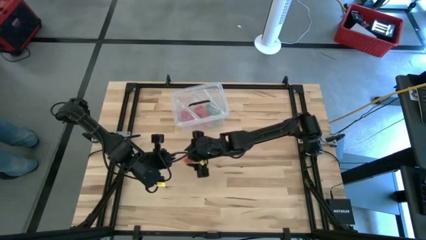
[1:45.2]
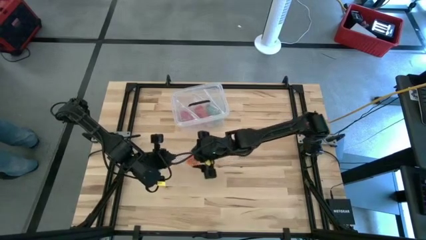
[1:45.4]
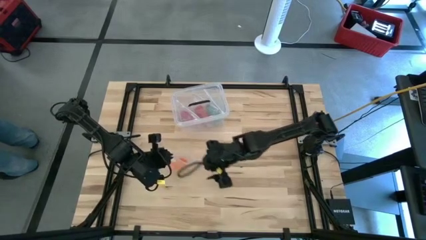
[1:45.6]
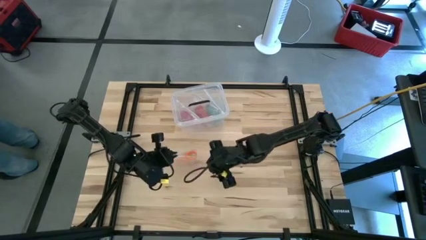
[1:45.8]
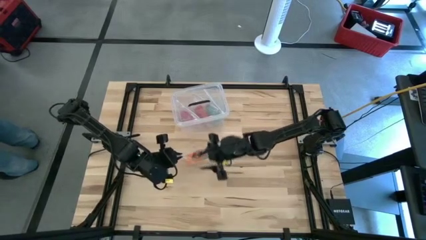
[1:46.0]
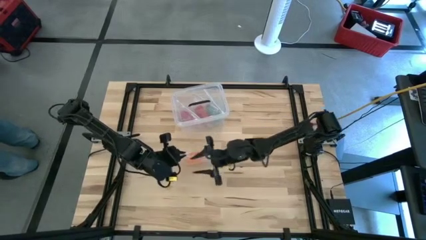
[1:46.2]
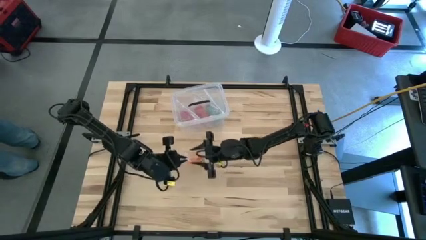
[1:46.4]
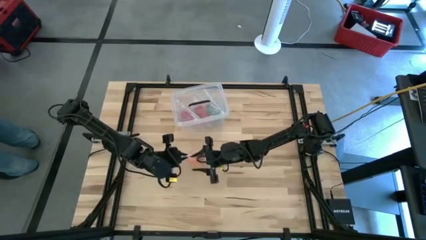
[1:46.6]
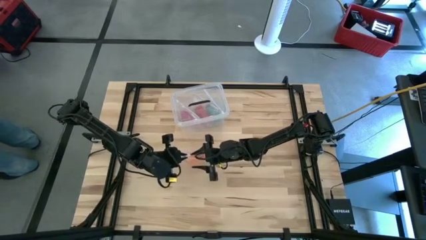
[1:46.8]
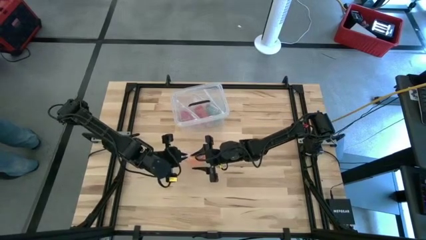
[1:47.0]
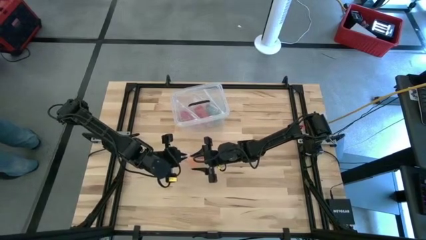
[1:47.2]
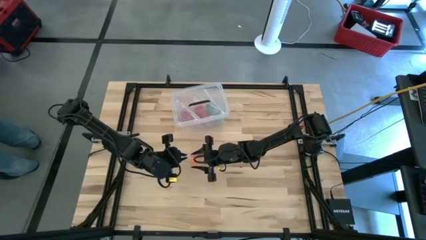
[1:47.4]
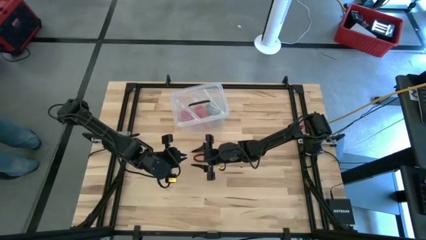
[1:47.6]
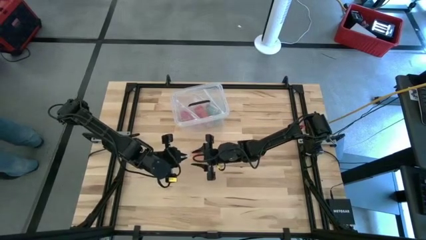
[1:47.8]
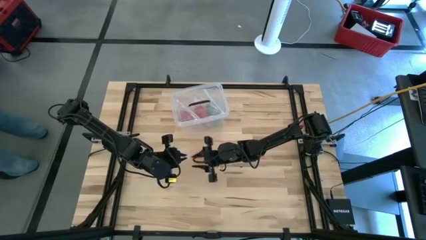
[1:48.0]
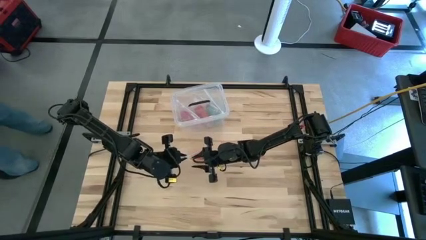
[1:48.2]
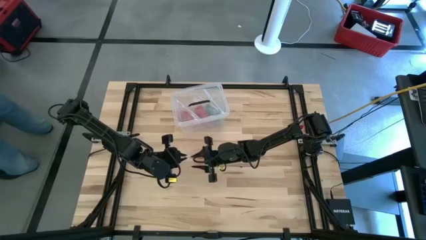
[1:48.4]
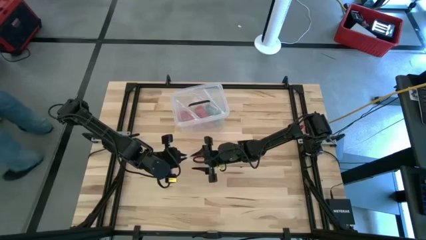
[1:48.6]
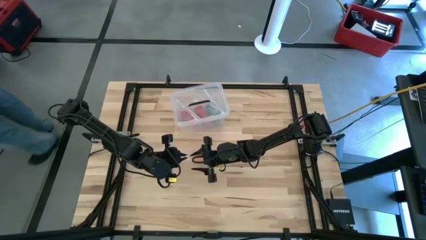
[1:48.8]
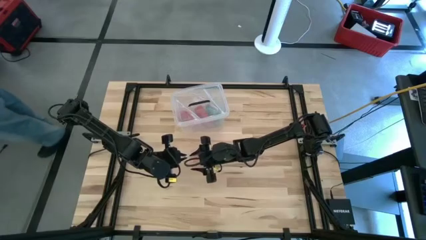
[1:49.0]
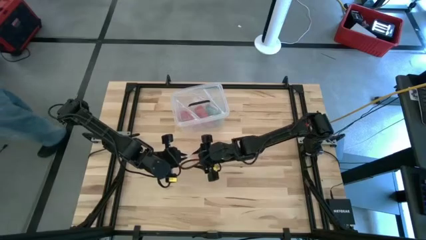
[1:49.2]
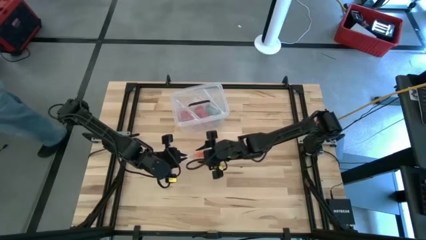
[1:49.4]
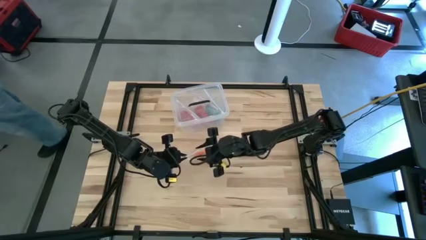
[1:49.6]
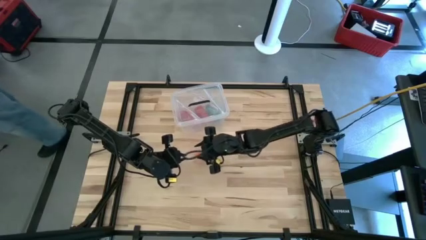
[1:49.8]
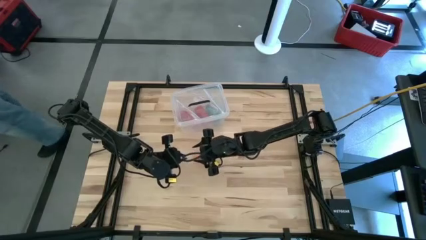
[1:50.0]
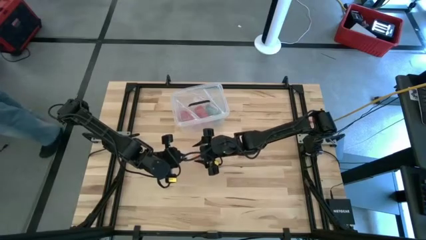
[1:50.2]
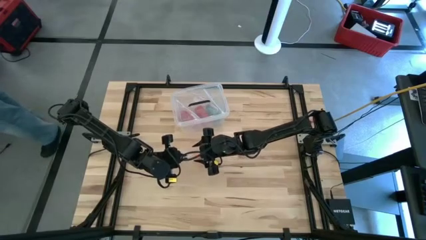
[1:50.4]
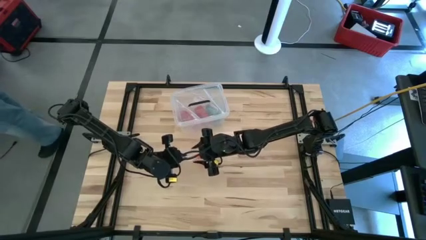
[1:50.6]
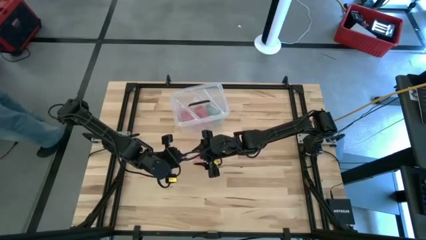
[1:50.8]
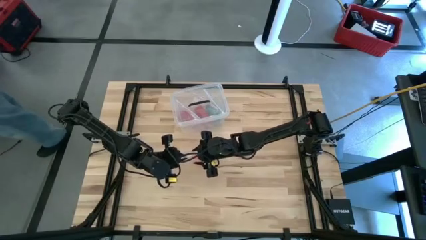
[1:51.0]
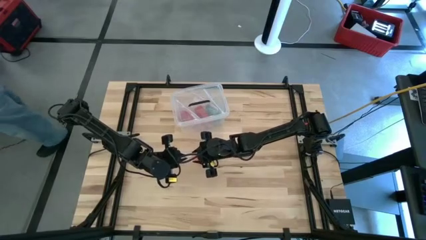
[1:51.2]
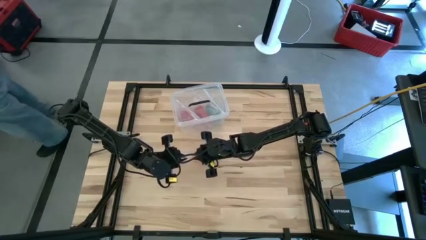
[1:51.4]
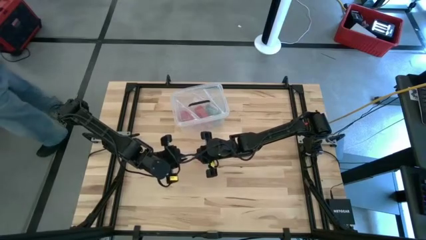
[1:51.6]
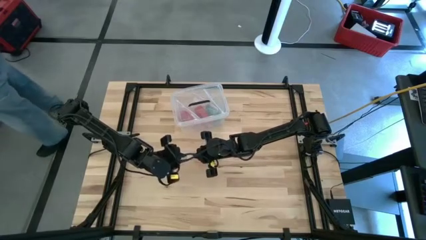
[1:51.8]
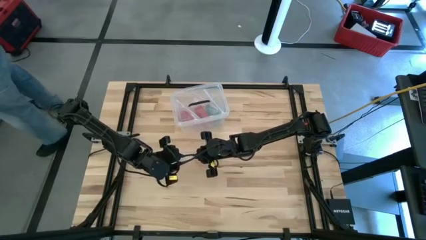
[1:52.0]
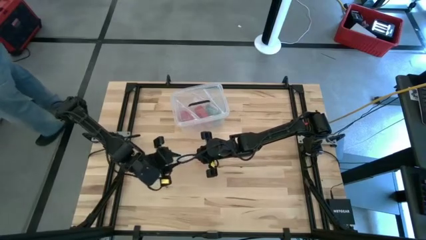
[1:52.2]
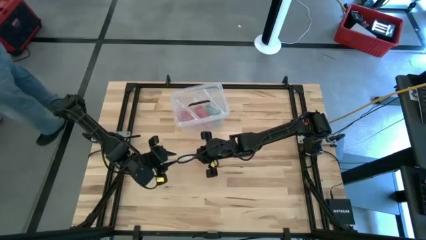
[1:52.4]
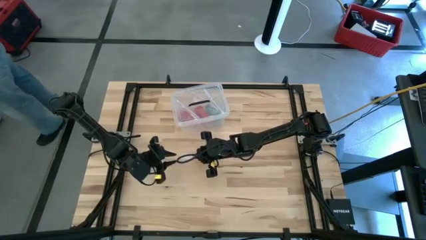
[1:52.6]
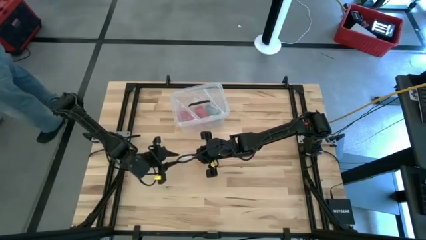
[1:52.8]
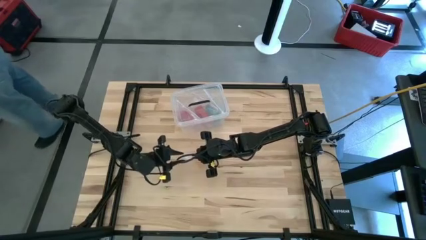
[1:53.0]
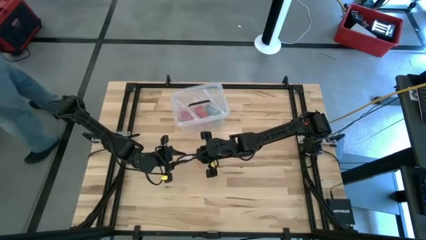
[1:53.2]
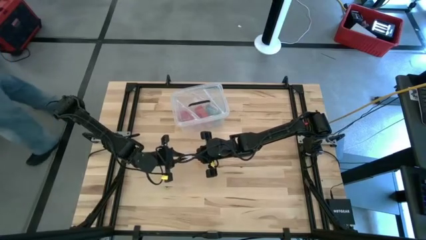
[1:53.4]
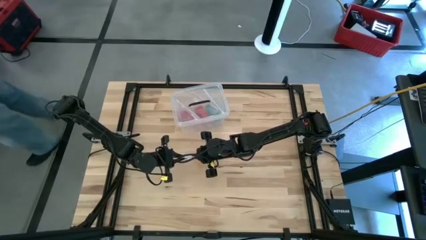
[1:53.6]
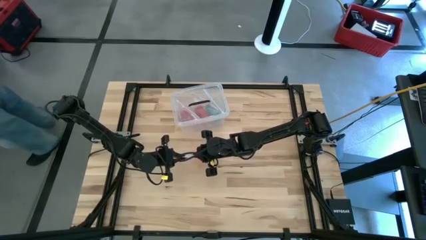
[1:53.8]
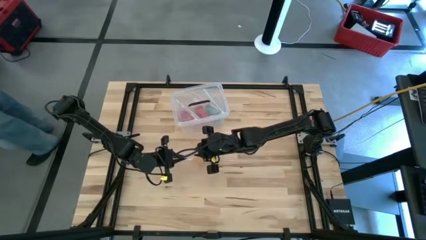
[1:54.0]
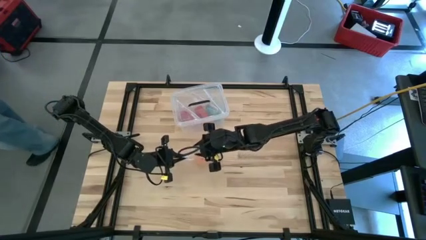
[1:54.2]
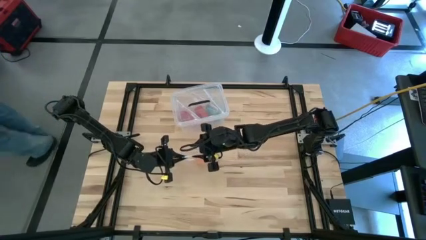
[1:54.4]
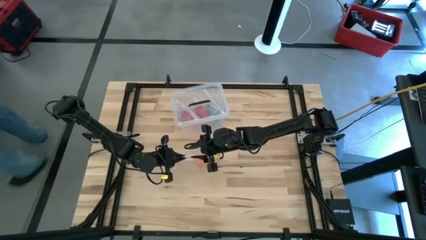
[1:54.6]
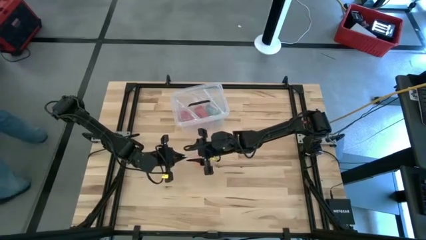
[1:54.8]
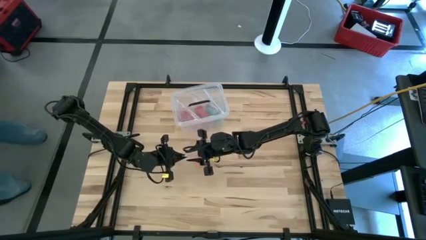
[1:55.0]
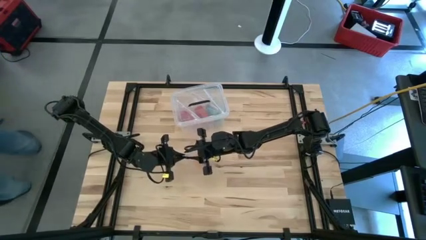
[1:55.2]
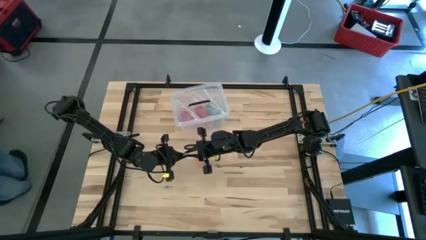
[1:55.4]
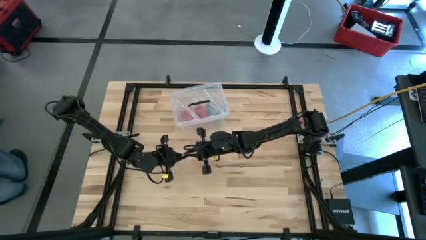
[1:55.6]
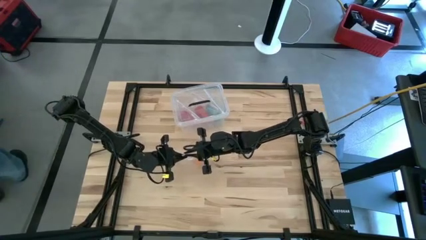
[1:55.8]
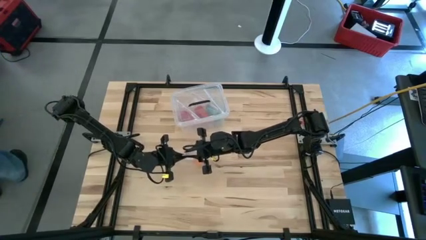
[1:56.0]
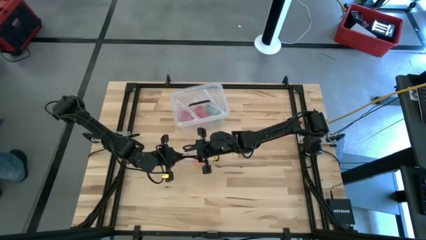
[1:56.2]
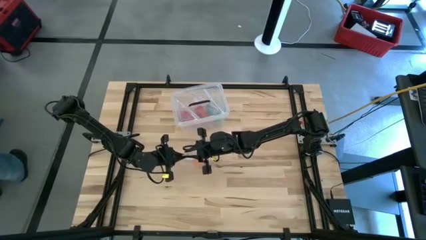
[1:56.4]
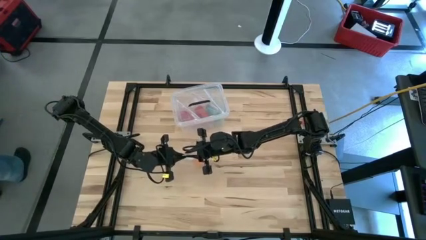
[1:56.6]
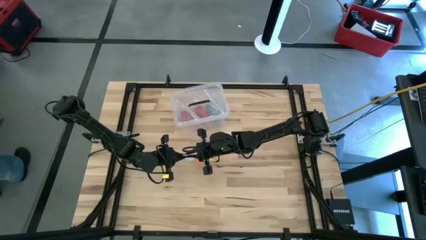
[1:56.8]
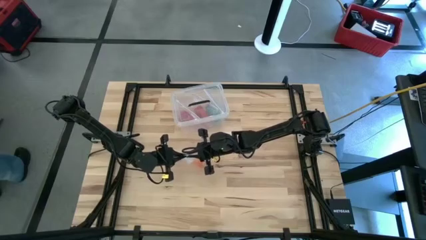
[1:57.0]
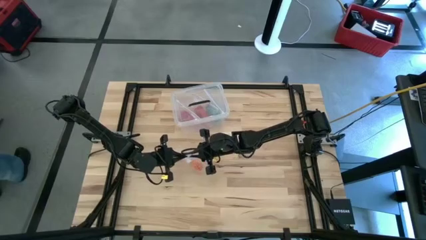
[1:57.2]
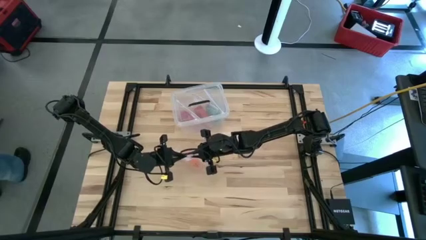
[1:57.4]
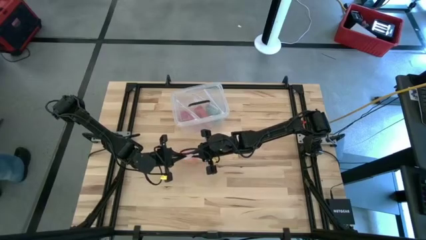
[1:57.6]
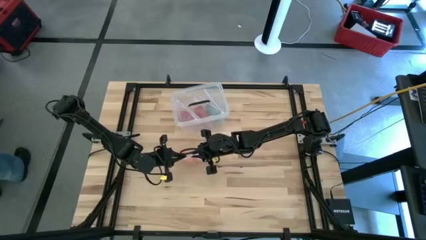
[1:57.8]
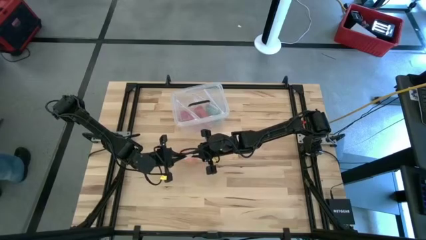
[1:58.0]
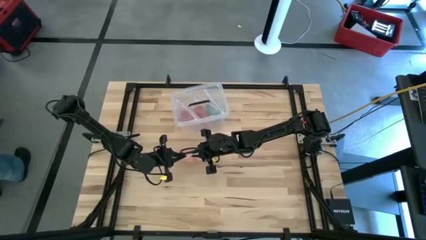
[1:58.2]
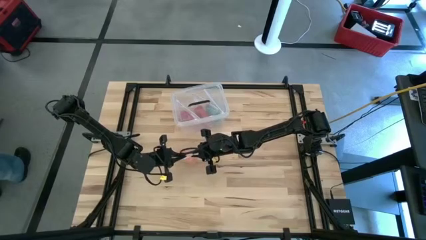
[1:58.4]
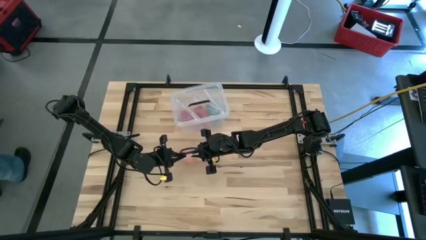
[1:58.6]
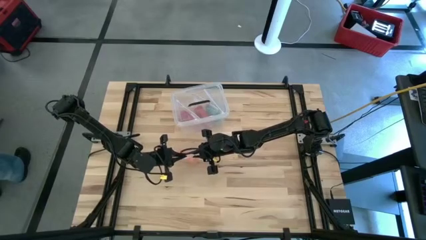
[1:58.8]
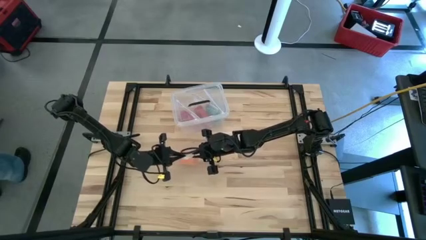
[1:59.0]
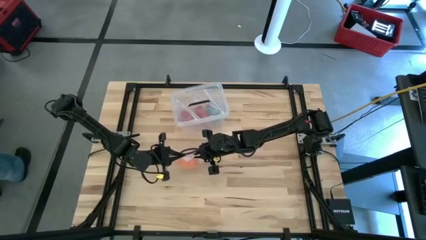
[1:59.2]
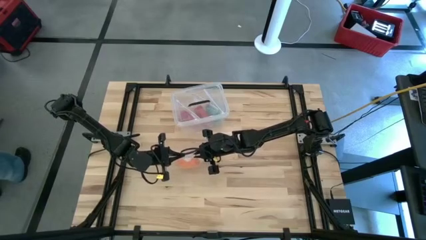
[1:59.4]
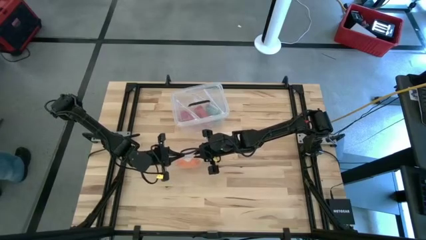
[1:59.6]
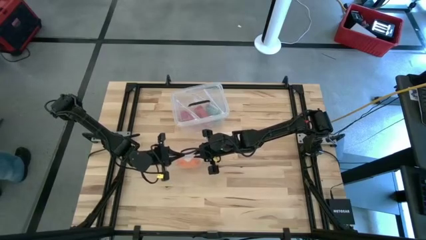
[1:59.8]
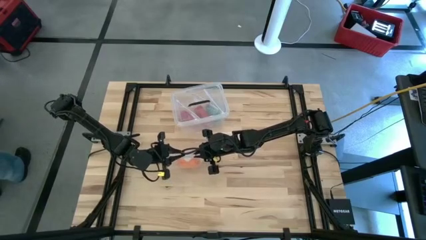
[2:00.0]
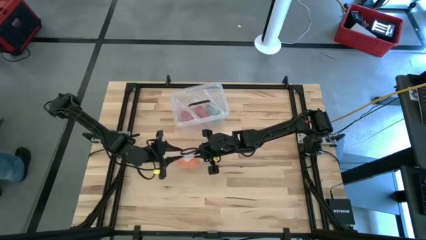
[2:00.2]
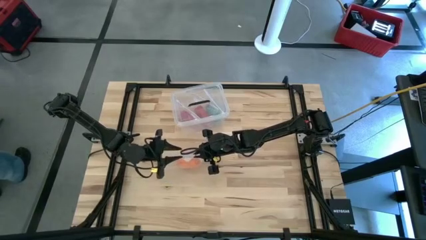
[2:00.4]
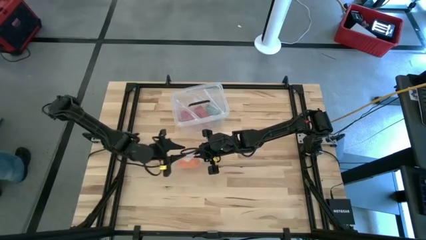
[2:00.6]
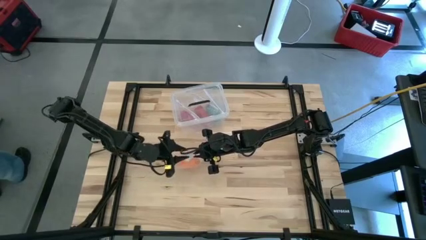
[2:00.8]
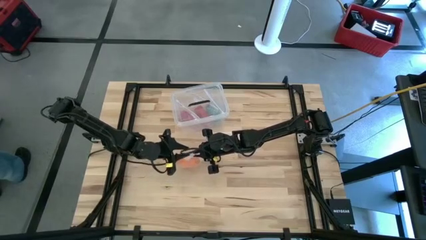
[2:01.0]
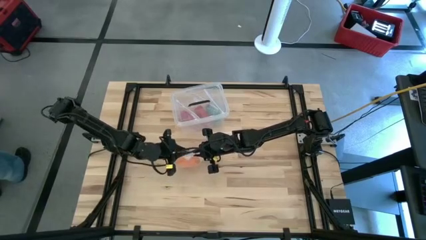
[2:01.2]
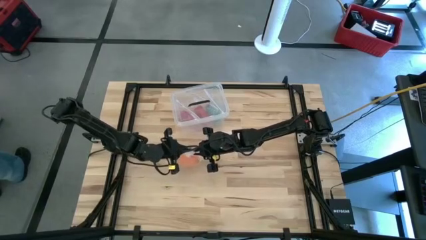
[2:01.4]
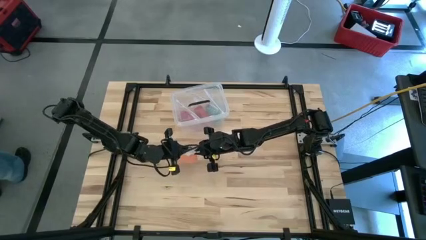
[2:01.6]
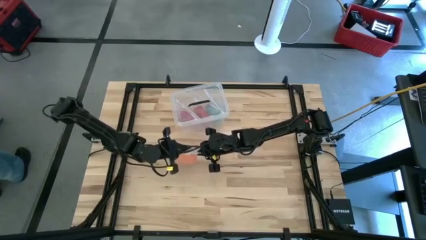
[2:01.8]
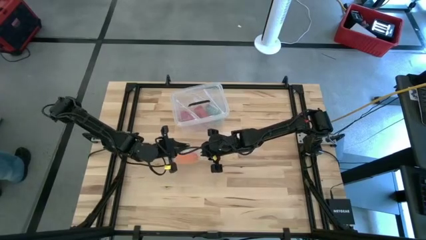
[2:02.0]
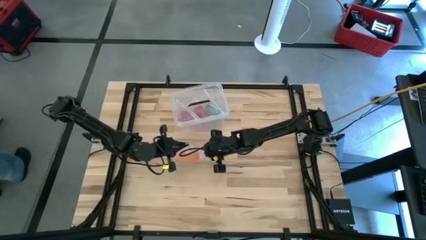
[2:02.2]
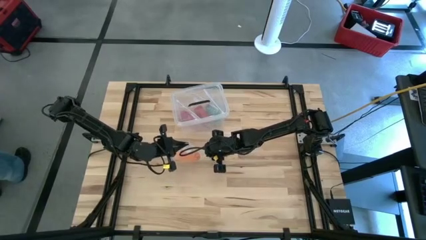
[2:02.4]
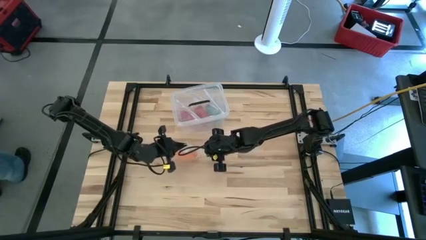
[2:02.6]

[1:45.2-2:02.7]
Task: Roll bandage
Close the transparent zip bag
